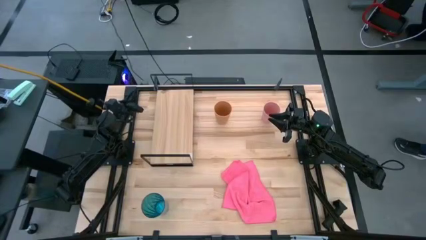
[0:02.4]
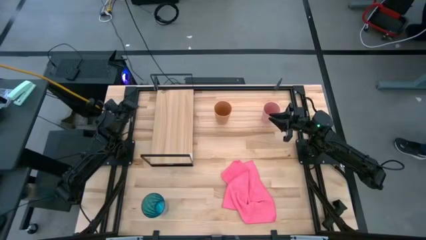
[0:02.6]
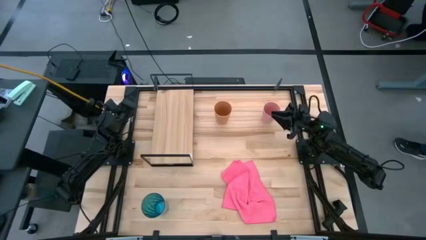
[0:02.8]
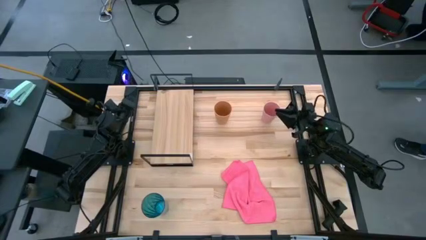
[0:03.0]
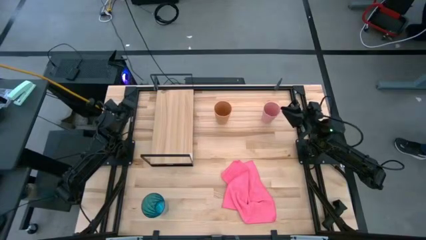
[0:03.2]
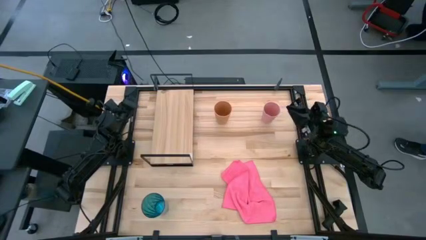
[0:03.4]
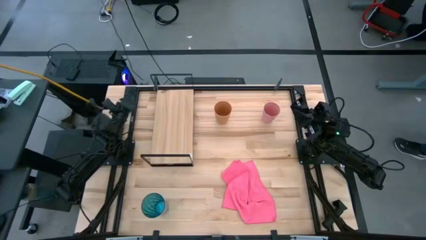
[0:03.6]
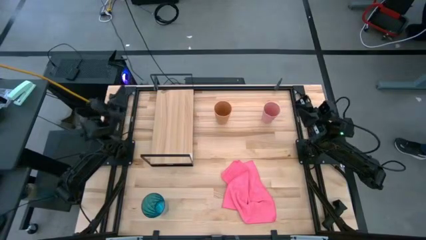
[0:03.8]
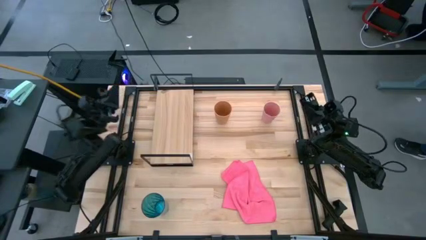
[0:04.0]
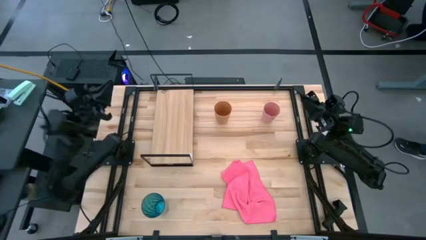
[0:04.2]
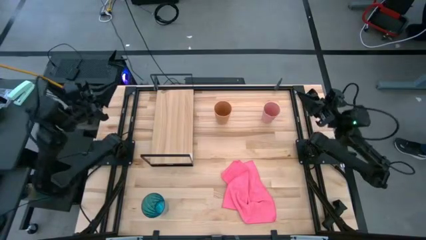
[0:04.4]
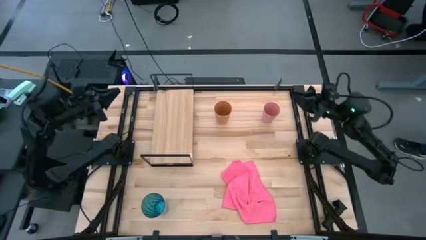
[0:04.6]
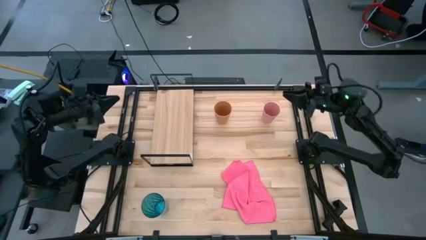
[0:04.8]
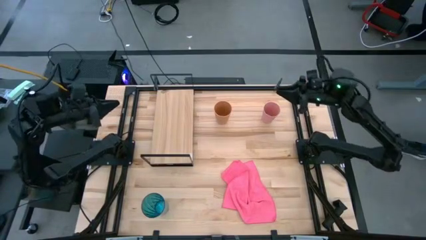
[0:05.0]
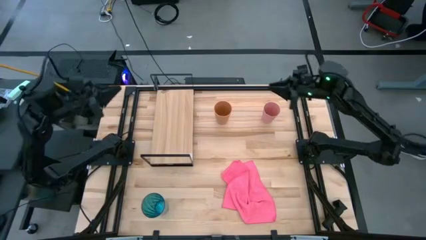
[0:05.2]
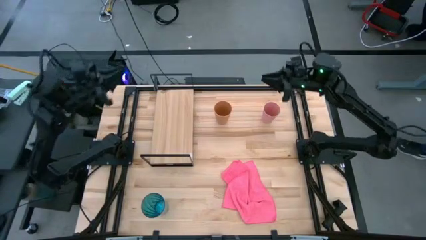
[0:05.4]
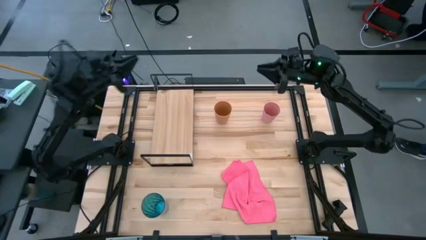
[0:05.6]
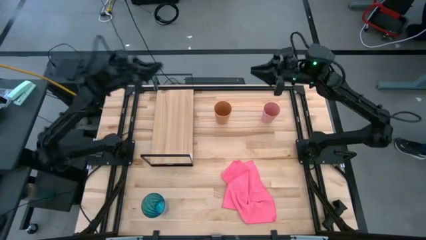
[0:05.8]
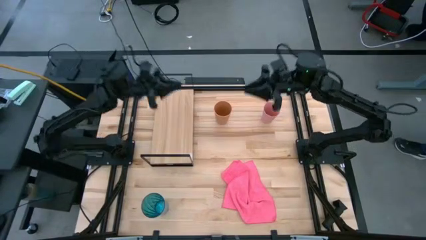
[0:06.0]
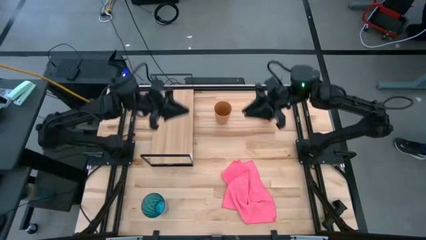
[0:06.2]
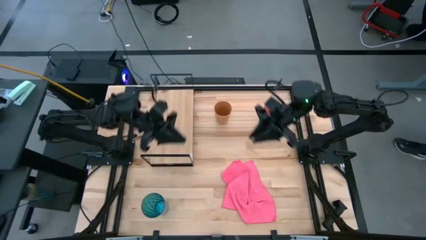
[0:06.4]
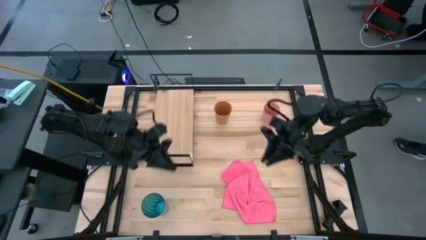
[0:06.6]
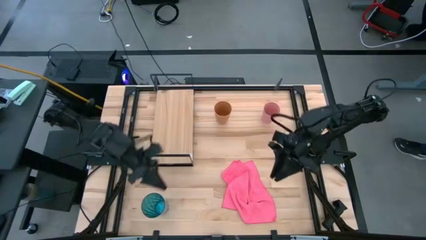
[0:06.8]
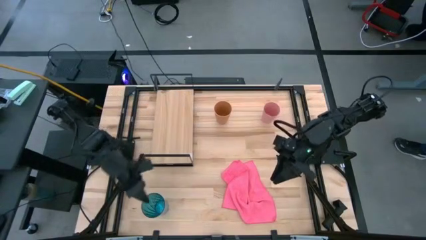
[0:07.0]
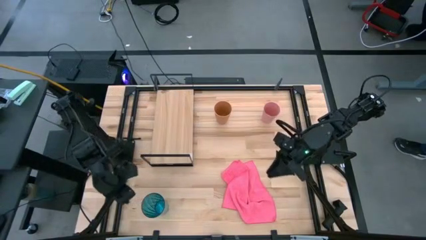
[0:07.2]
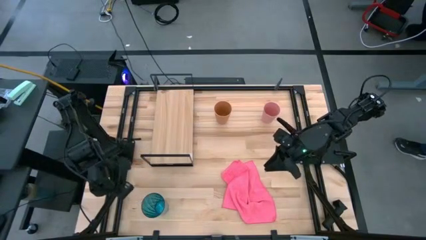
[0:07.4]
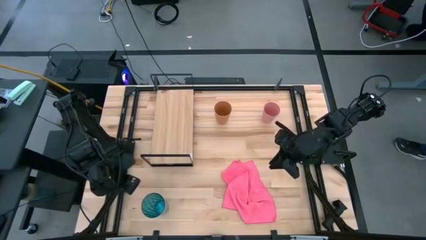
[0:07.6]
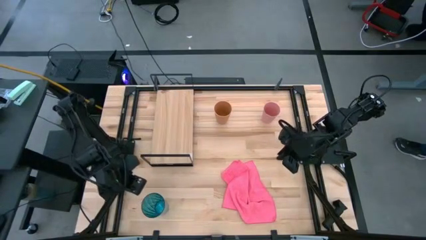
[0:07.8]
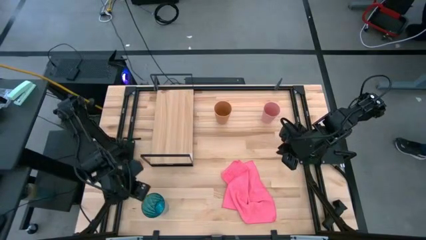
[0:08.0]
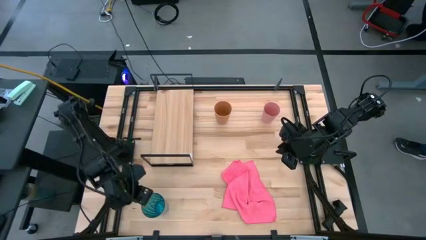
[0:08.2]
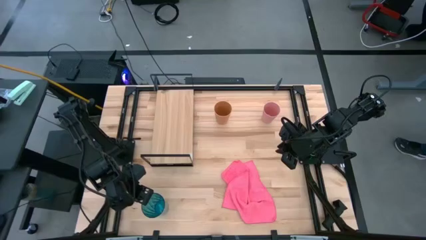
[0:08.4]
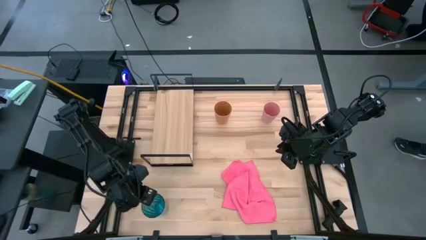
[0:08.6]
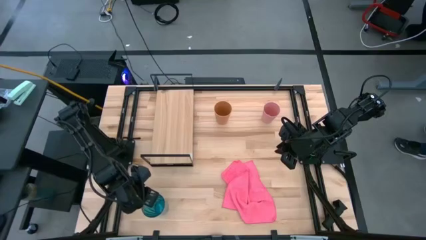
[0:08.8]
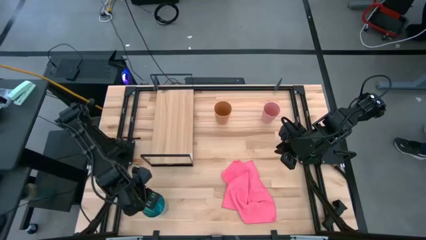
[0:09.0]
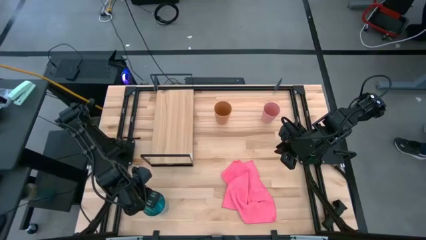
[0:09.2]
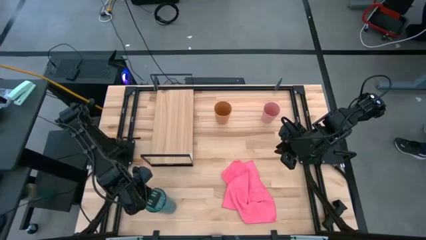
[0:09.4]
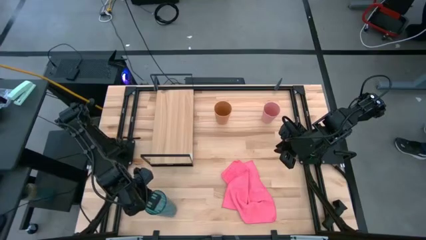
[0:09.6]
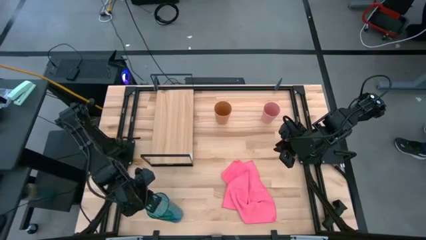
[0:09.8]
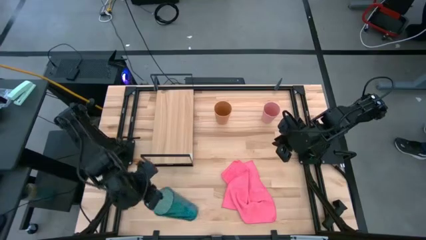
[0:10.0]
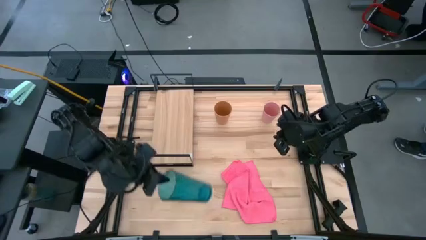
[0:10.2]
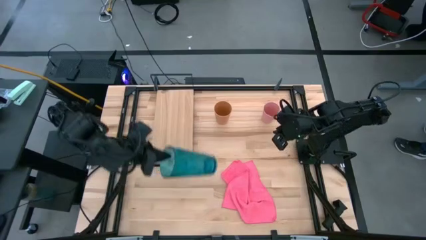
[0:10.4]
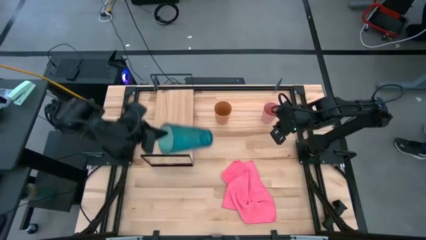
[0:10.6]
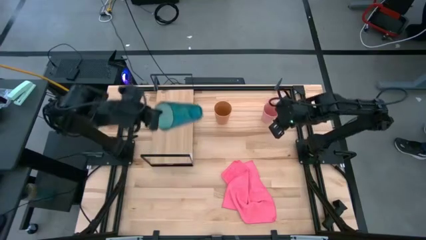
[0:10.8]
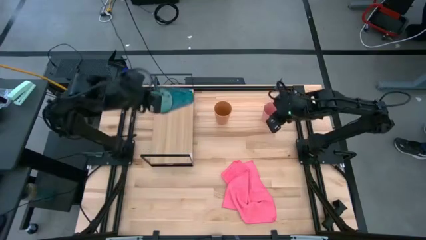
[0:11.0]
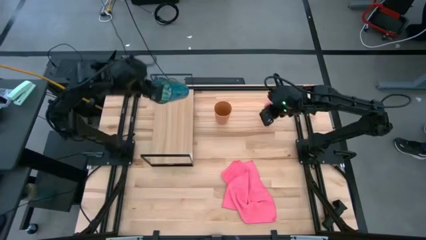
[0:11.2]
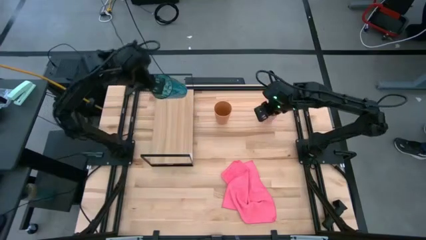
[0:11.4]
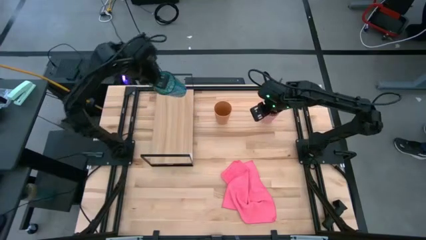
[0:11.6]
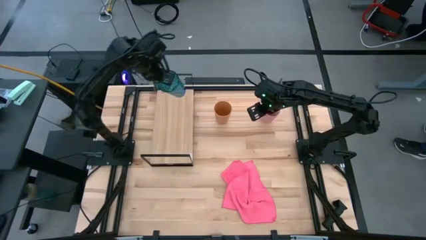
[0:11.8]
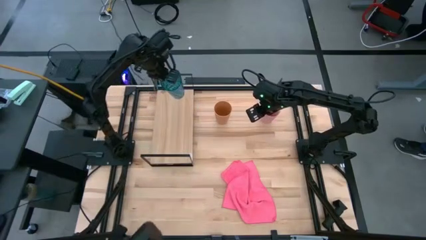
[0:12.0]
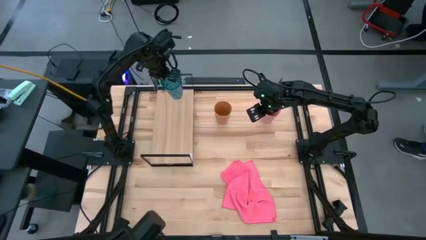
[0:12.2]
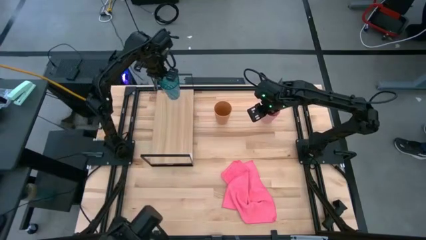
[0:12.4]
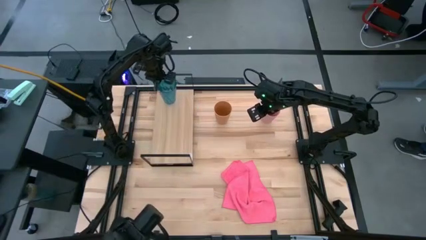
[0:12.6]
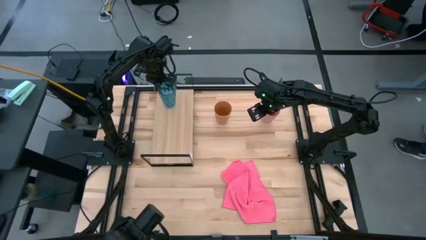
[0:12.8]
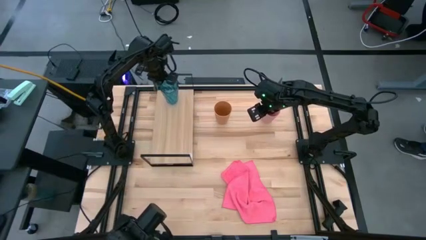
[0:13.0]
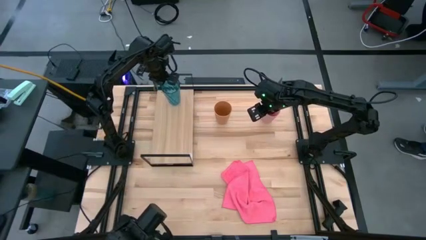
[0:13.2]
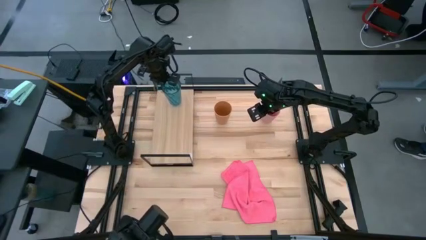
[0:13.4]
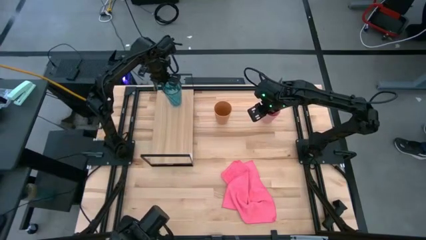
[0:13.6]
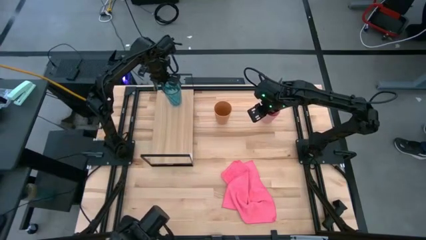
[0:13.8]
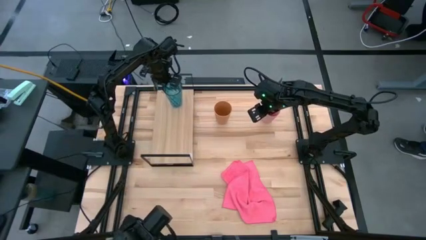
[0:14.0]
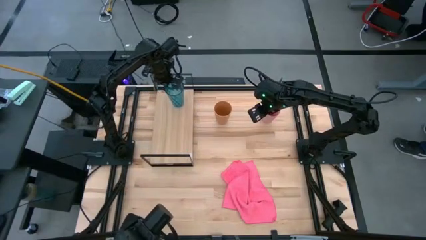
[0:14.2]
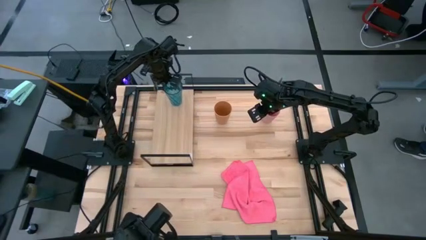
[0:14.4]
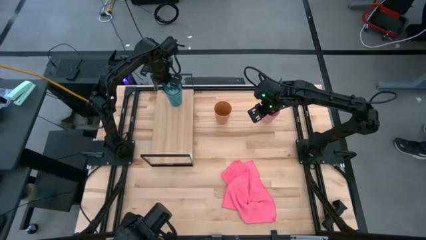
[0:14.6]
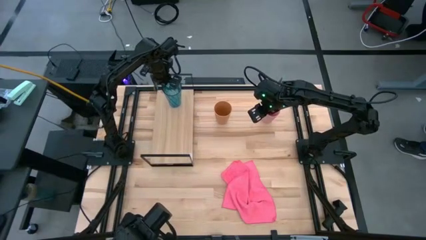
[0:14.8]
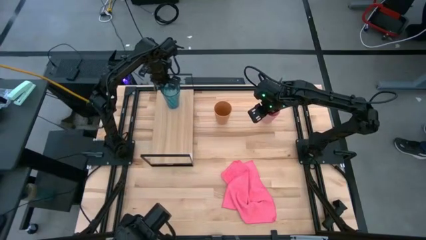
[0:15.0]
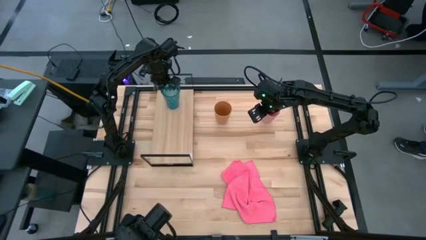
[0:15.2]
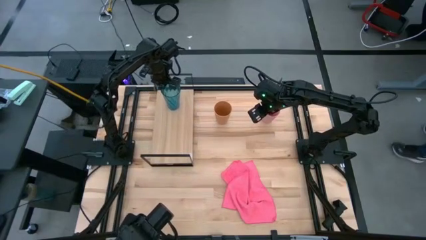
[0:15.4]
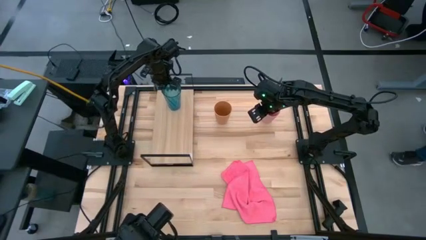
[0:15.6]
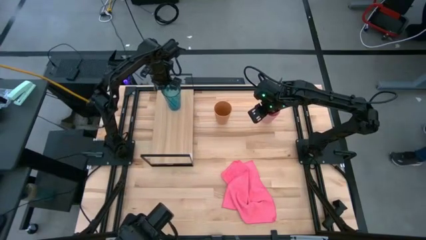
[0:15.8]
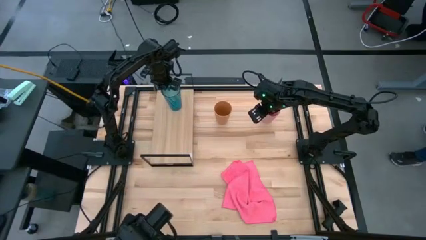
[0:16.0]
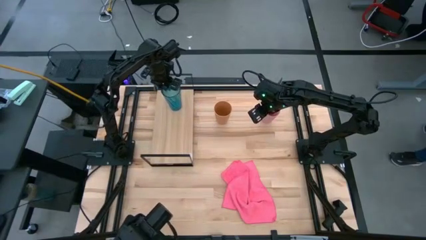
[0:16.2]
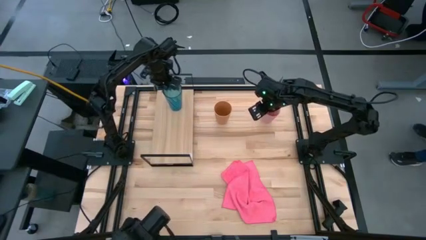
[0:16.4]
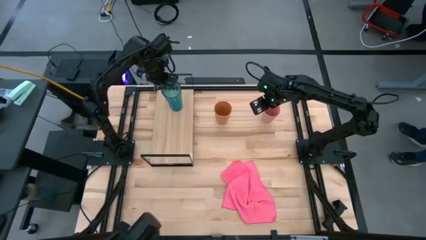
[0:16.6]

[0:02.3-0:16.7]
Task: Stack small to large cups/mugs on shelf
Put the blue cup on the shelf
